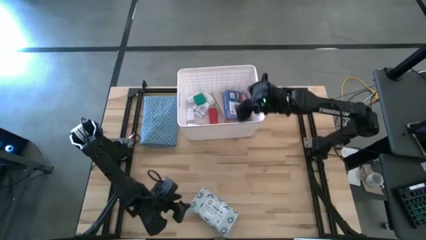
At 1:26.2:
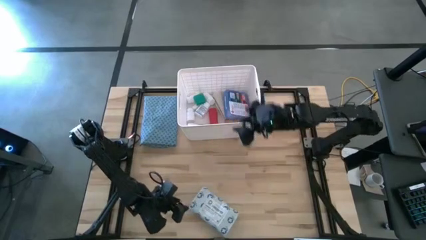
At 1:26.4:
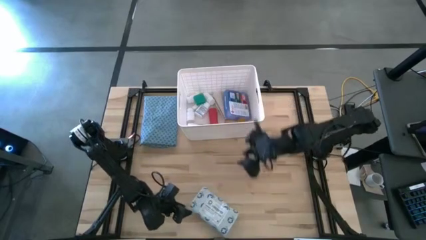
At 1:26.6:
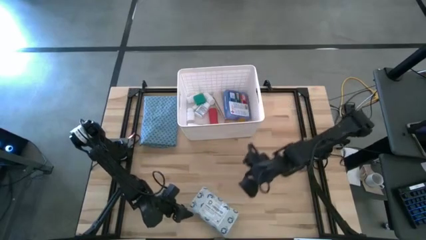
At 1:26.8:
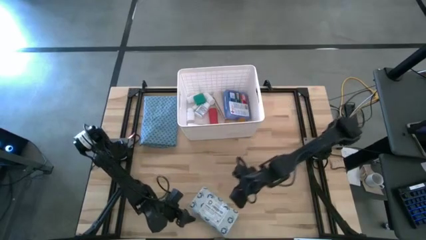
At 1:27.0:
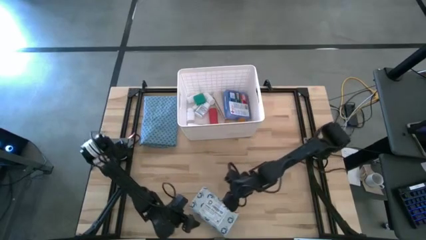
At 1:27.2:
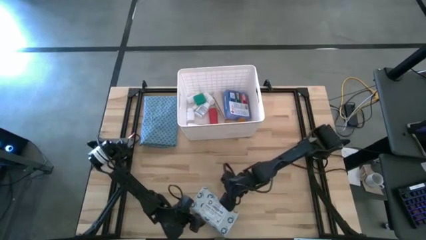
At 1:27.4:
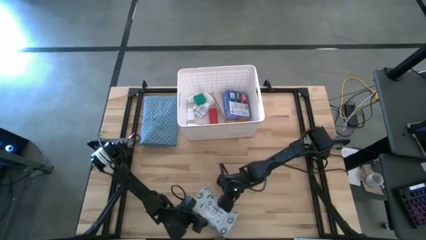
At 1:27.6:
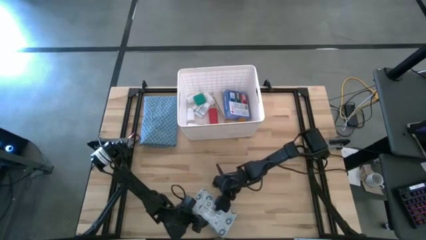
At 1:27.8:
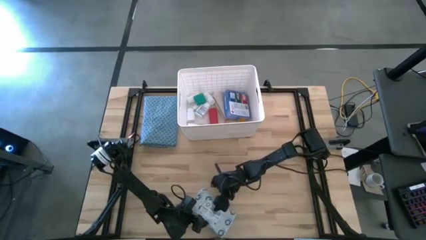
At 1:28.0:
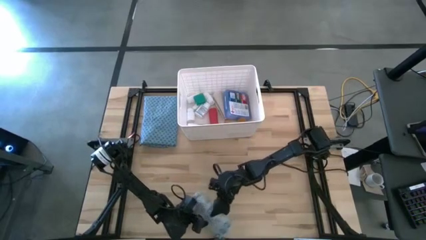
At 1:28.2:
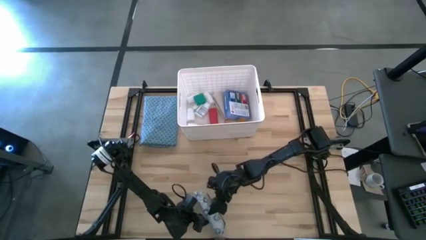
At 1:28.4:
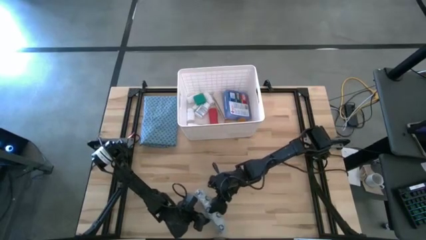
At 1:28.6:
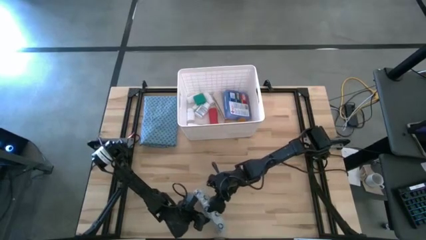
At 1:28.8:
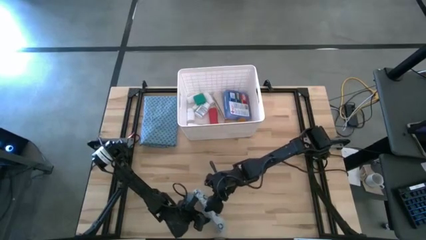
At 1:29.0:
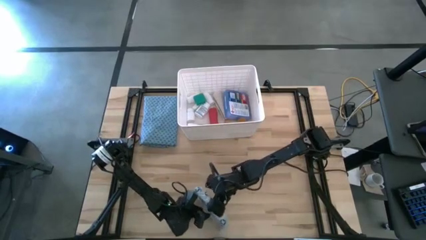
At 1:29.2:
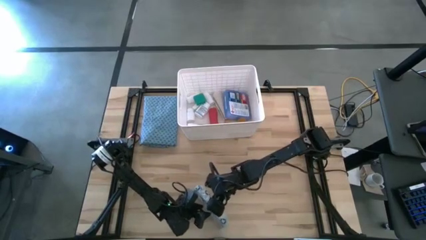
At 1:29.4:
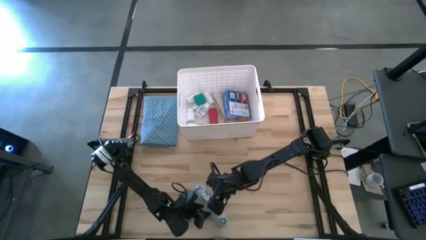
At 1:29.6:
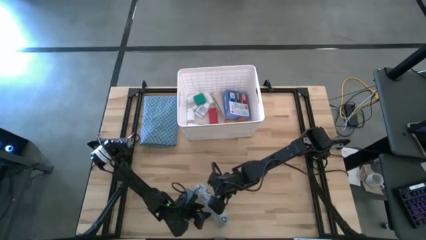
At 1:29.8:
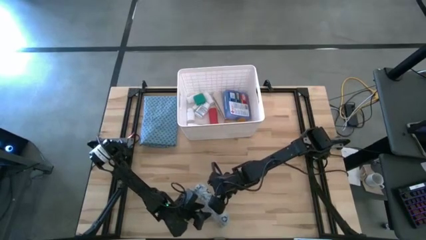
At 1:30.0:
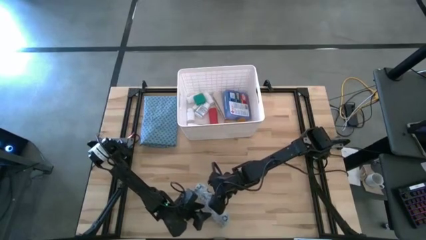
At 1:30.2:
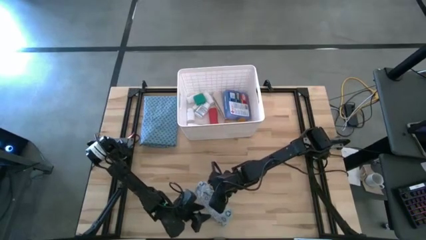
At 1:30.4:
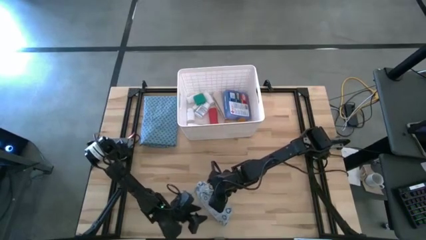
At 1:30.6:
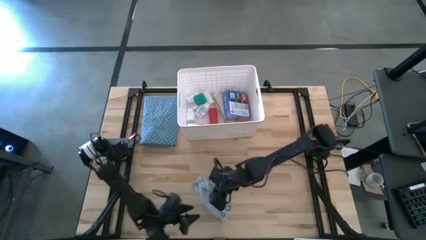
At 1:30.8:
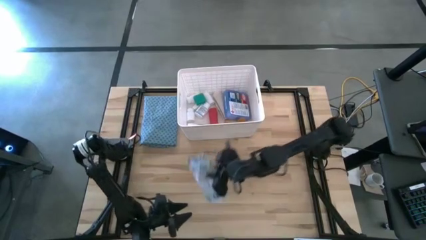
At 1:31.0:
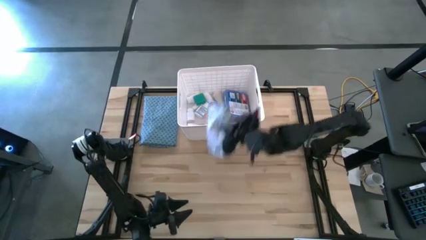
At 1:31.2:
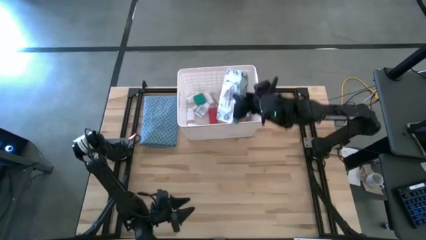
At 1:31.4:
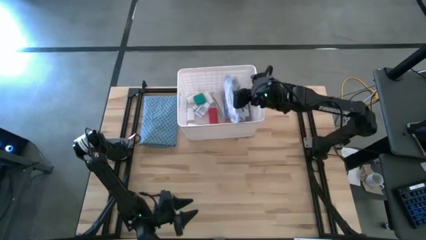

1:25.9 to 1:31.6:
Task: Pick & place medical supplies in basket/bin
Put the white mailer bag into the white container

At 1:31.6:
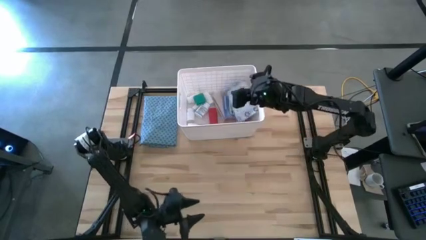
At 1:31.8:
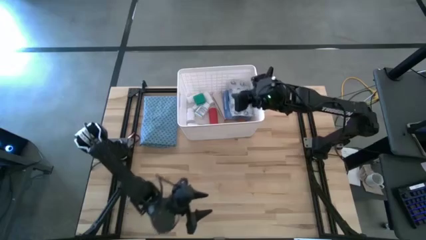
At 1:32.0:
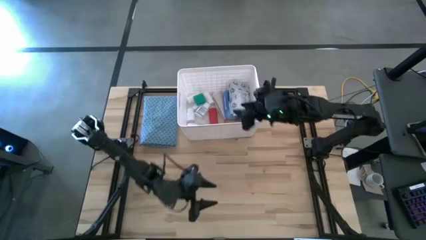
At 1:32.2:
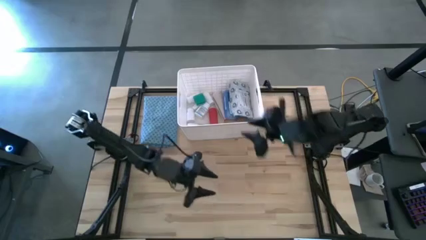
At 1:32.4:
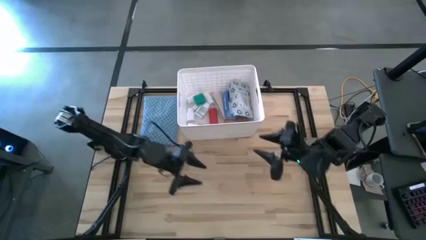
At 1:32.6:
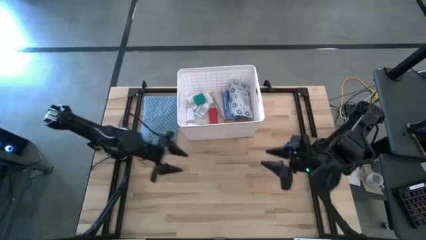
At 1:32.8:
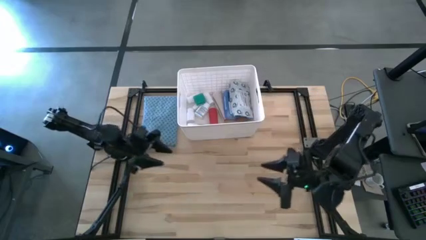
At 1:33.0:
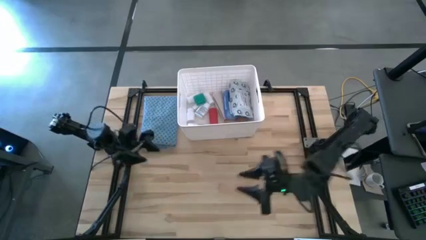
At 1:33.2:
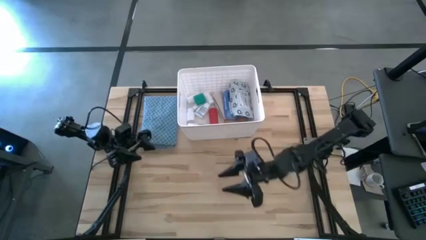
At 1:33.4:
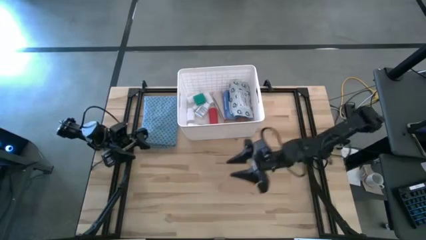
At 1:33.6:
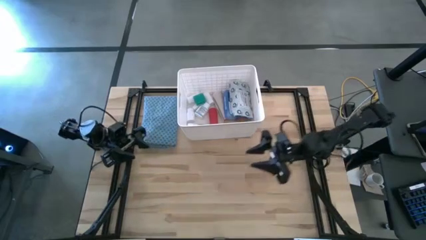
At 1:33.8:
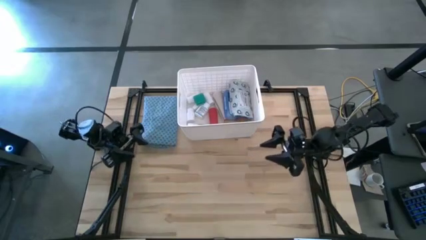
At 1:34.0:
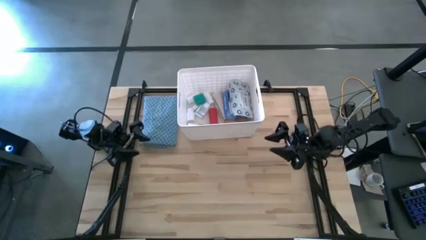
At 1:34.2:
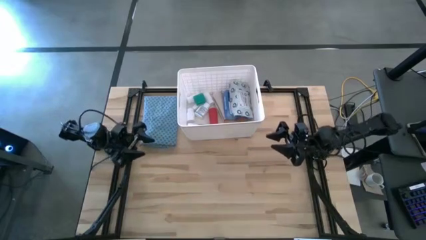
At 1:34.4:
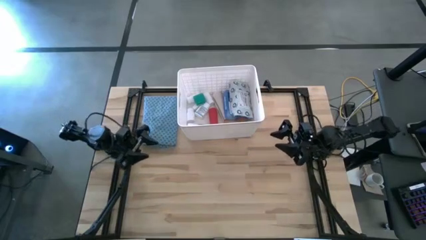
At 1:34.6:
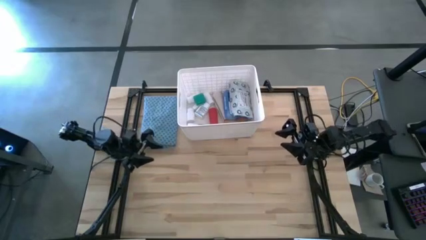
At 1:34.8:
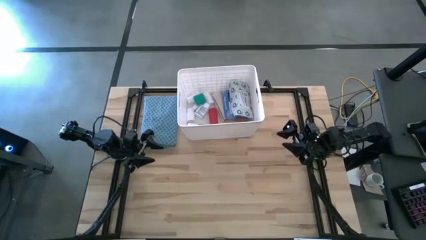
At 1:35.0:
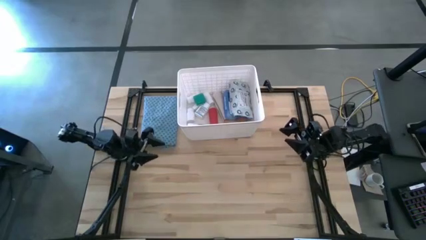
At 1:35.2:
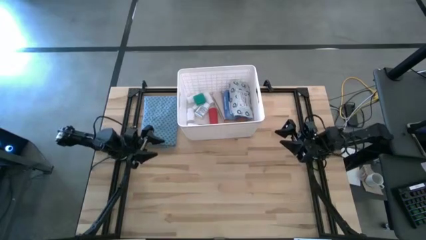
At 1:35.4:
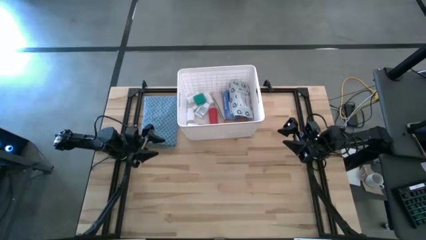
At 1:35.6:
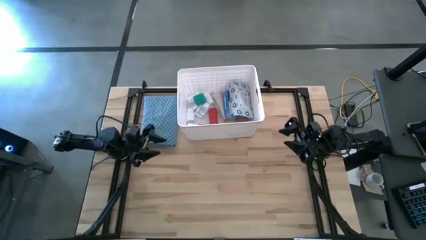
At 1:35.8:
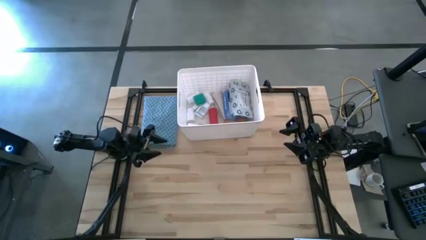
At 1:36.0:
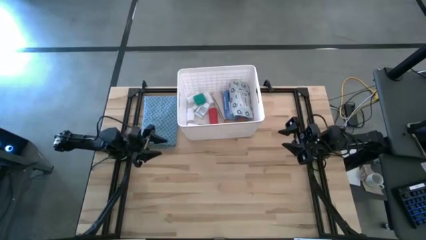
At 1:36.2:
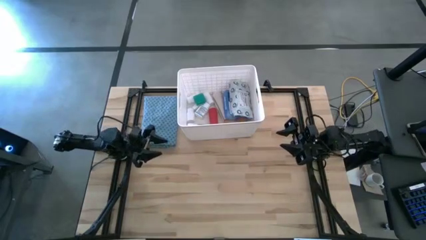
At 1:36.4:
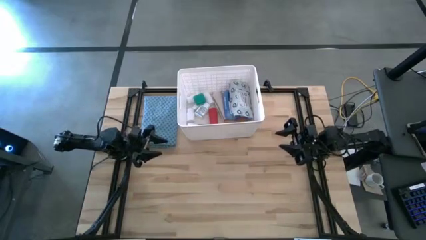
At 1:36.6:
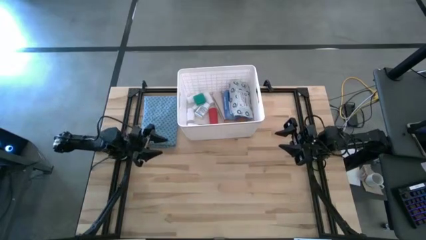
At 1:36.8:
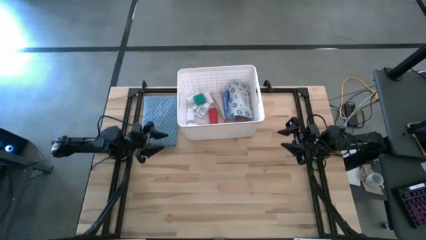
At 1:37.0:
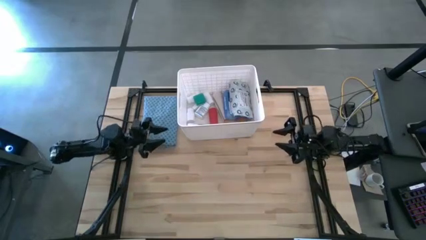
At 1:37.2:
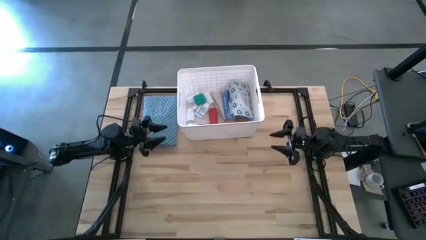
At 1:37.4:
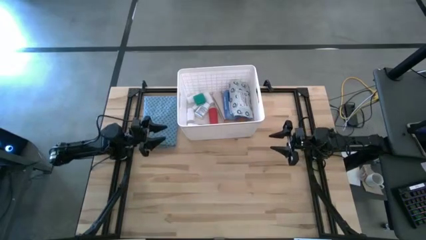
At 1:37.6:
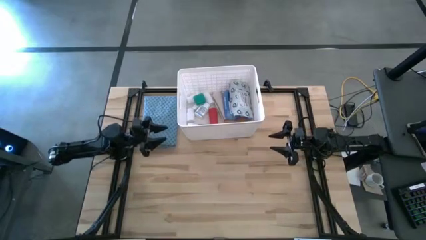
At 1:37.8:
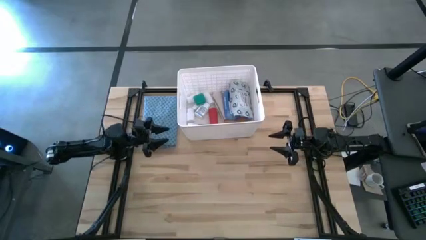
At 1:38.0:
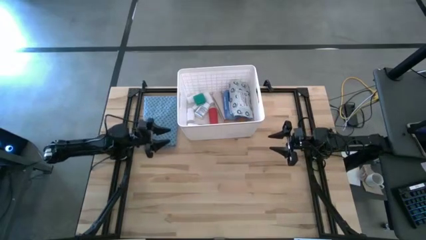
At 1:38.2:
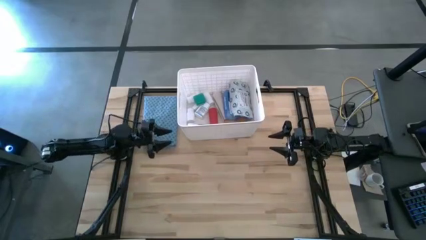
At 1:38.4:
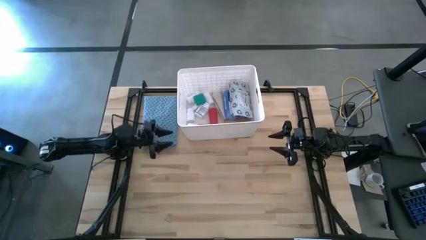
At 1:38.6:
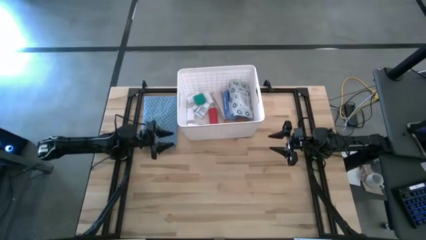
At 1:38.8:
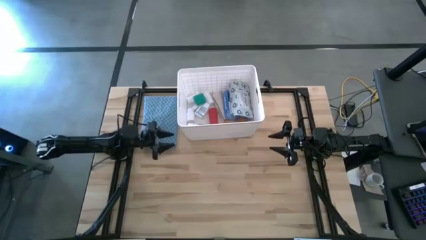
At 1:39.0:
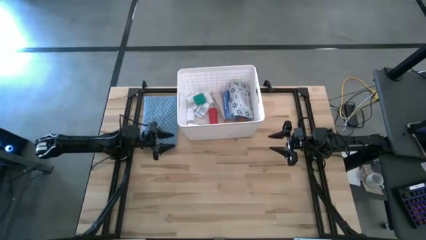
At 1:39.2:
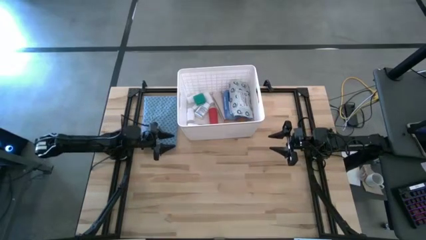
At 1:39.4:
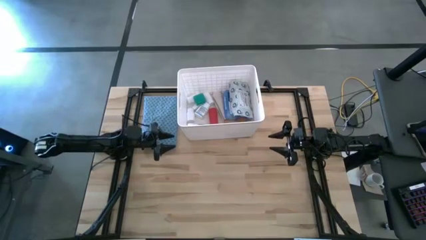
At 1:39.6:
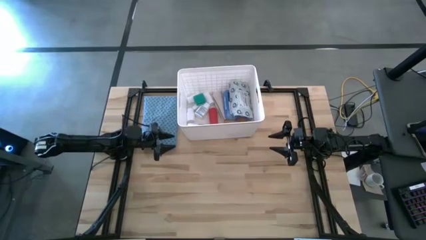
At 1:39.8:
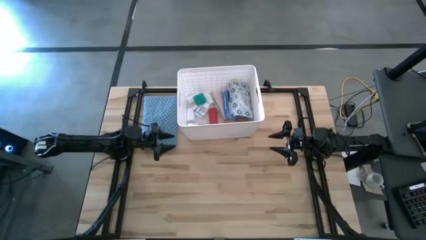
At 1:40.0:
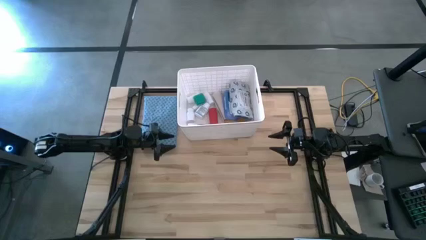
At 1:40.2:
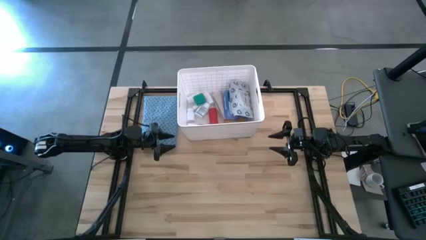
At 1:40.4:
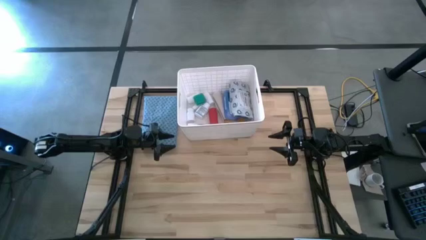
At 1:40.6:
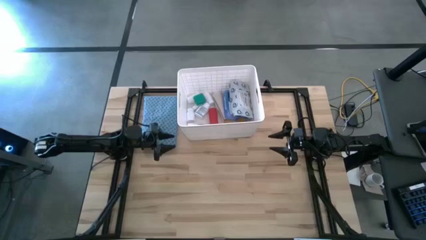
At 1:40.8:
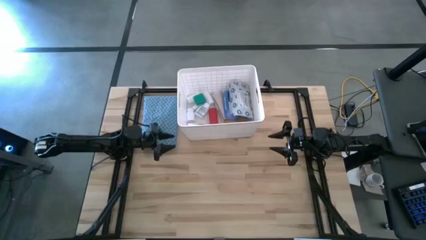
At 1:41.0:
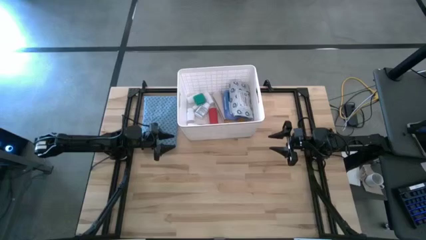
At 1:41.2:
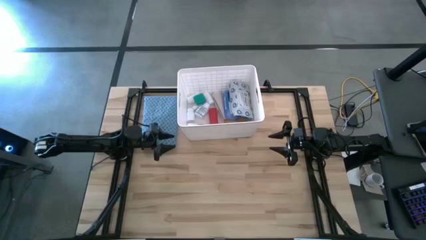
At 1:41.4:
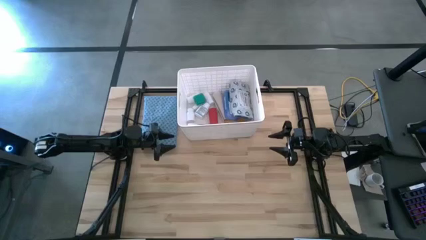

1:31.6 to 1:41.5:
Return to Home Position
